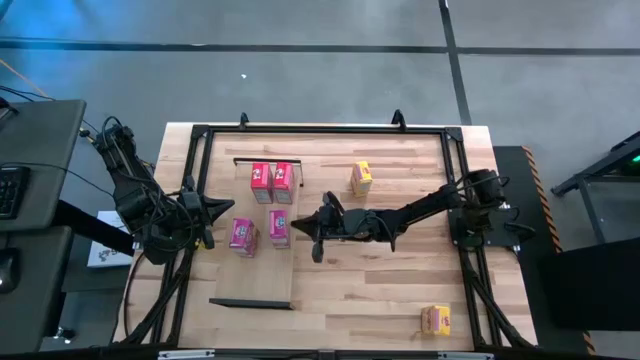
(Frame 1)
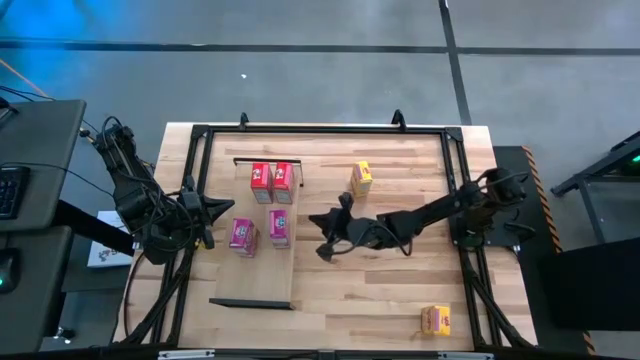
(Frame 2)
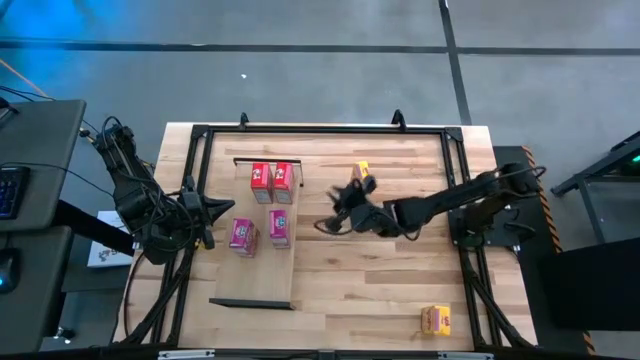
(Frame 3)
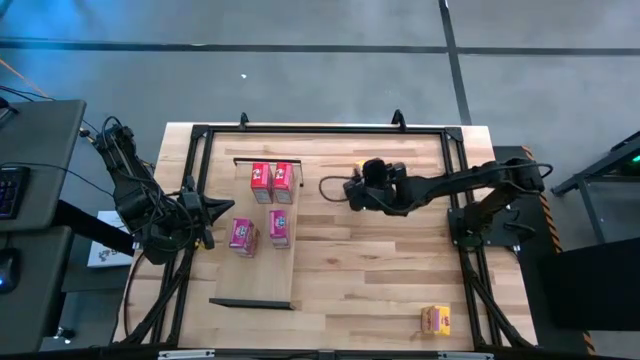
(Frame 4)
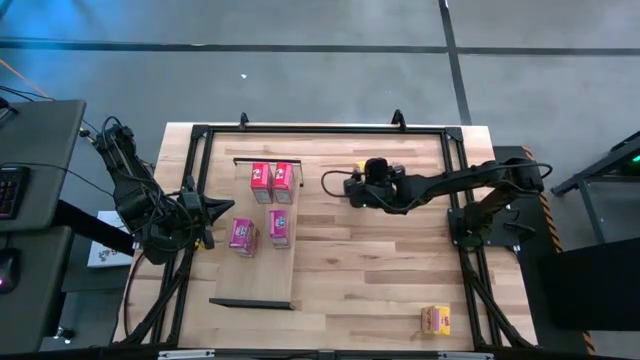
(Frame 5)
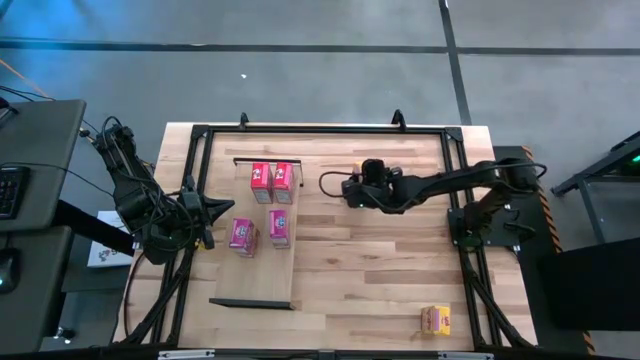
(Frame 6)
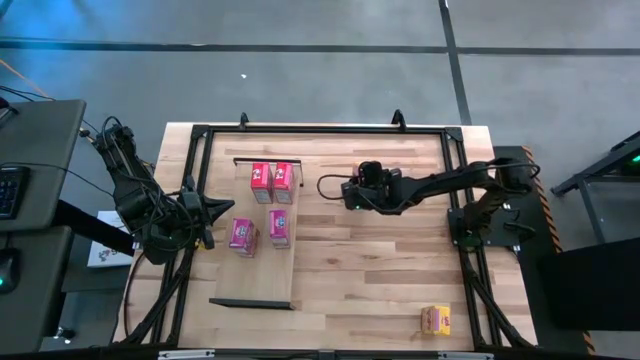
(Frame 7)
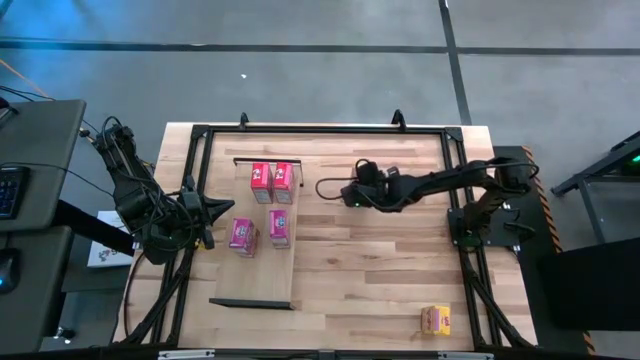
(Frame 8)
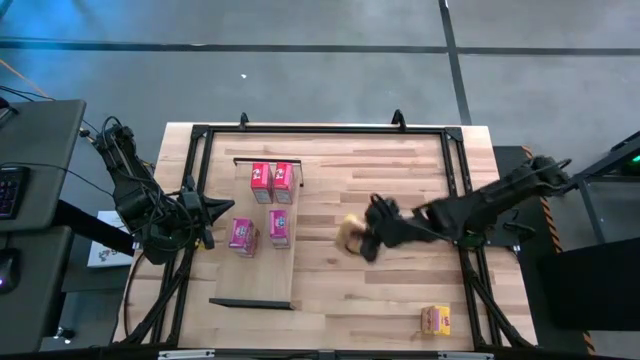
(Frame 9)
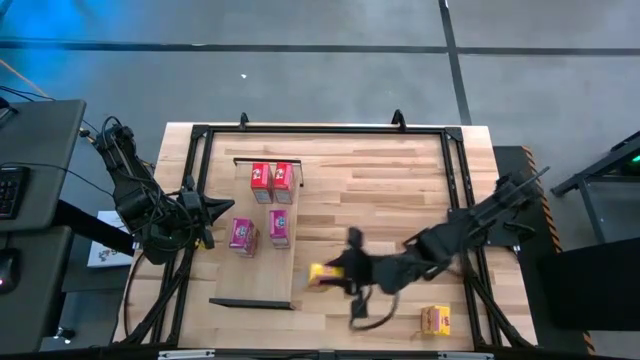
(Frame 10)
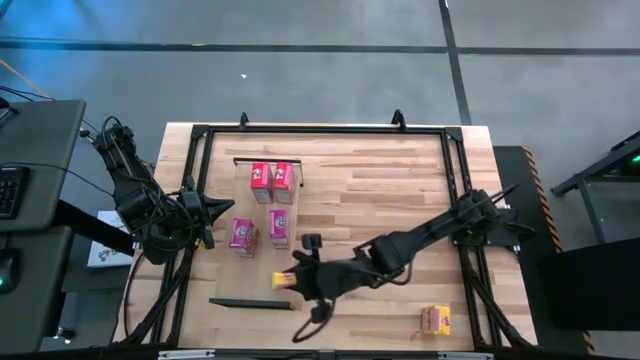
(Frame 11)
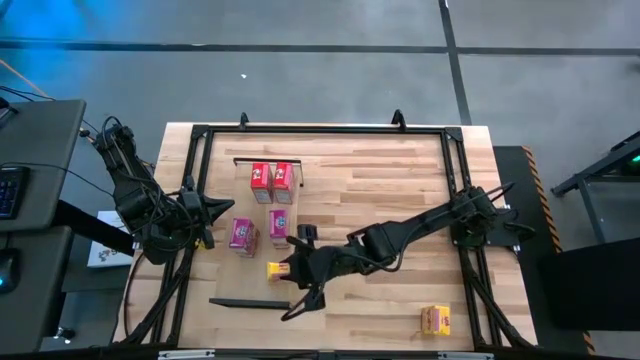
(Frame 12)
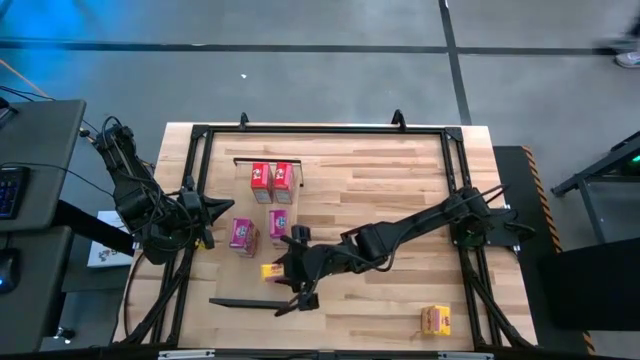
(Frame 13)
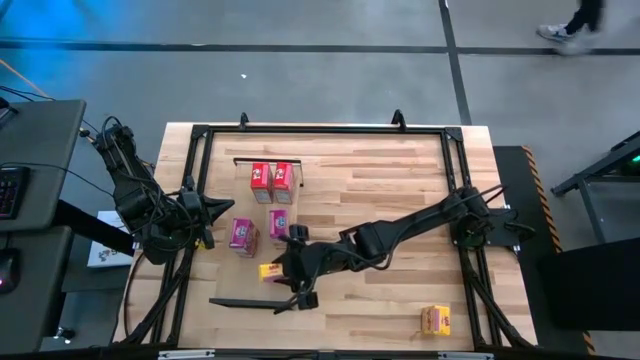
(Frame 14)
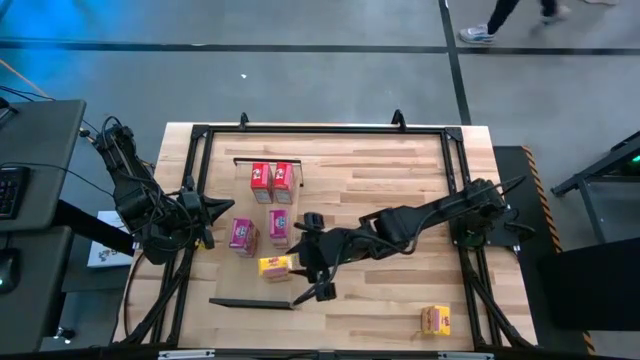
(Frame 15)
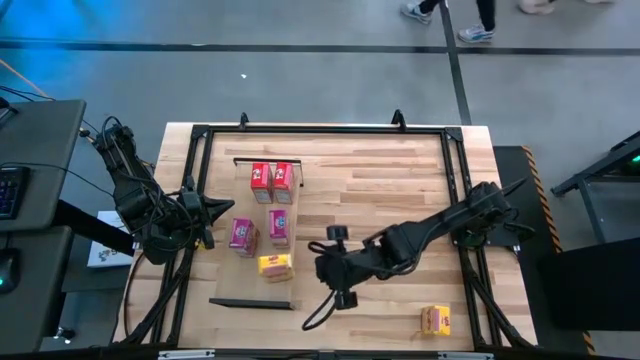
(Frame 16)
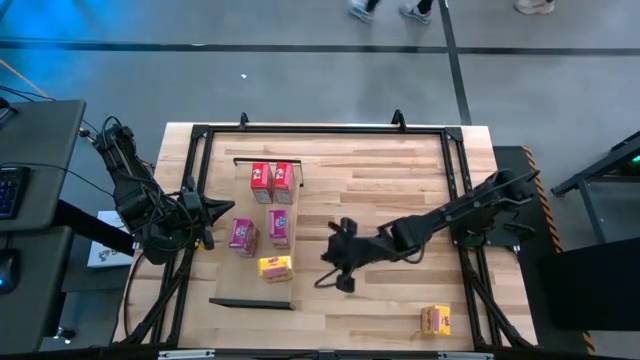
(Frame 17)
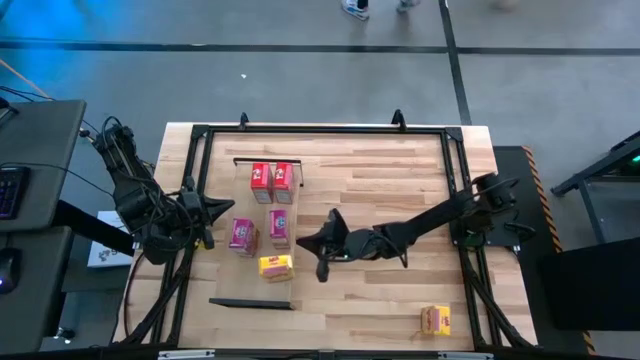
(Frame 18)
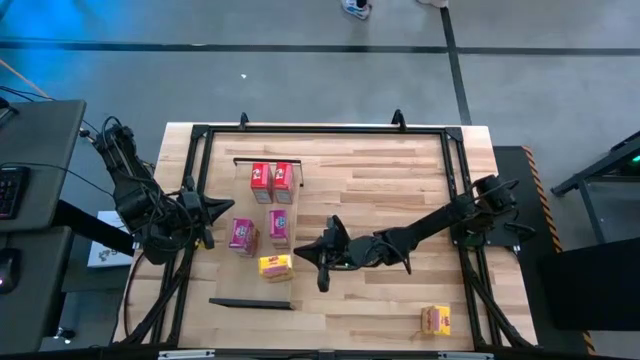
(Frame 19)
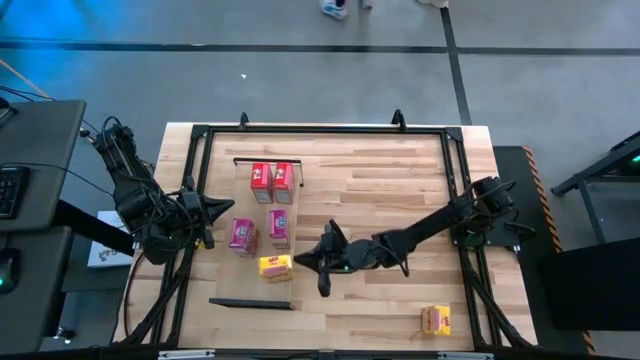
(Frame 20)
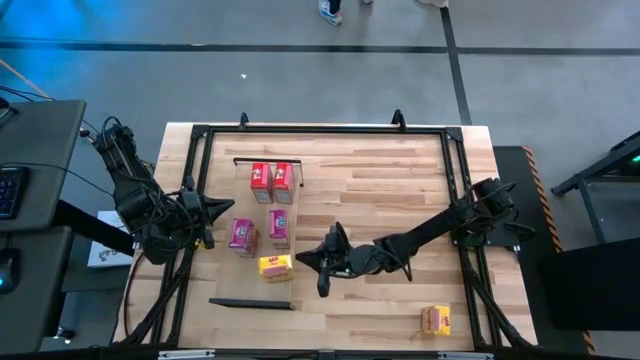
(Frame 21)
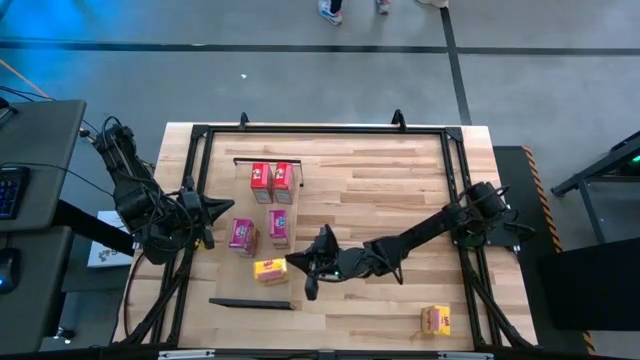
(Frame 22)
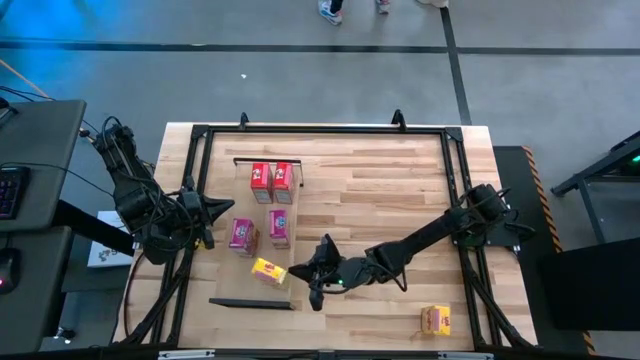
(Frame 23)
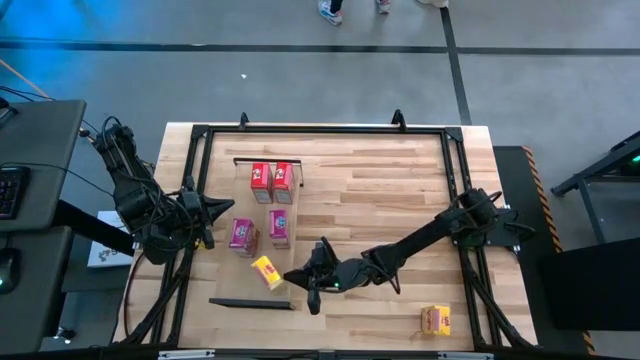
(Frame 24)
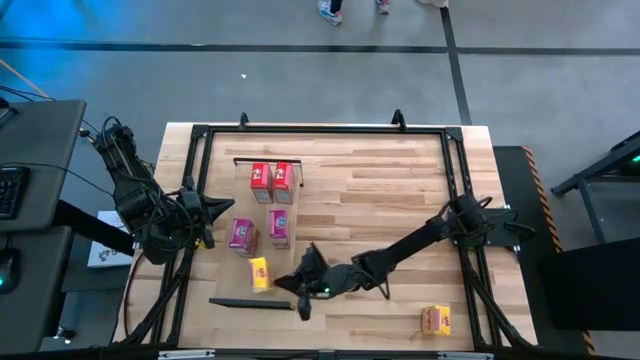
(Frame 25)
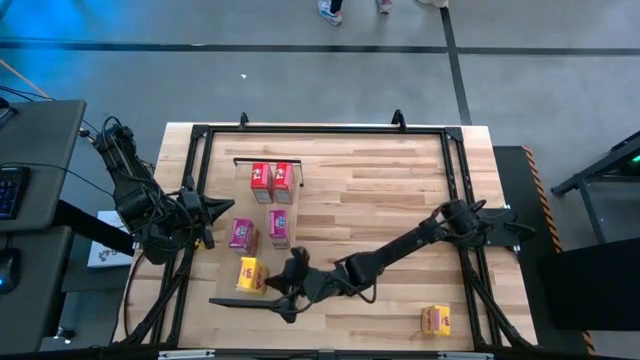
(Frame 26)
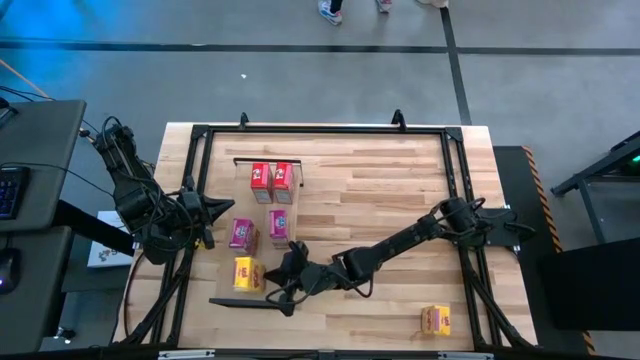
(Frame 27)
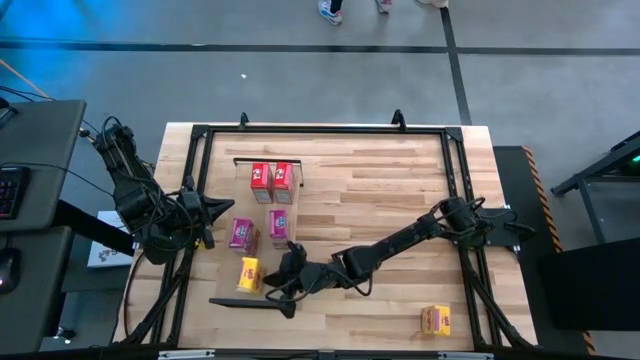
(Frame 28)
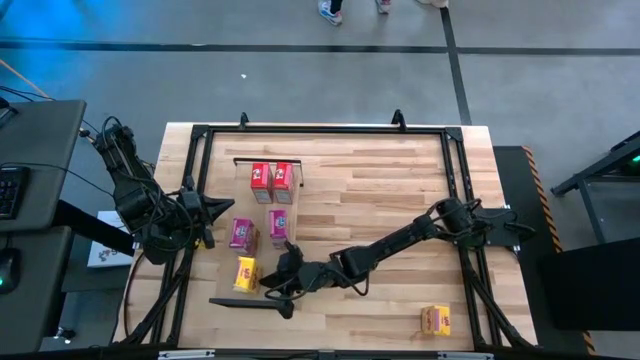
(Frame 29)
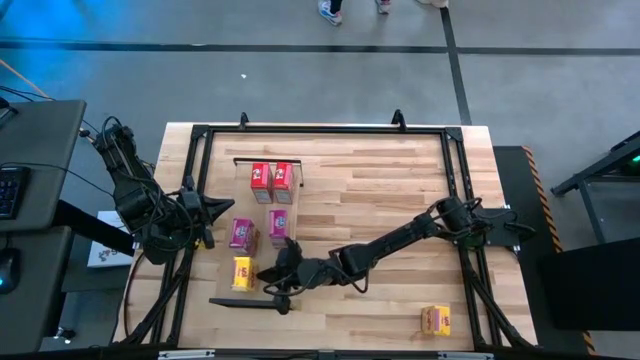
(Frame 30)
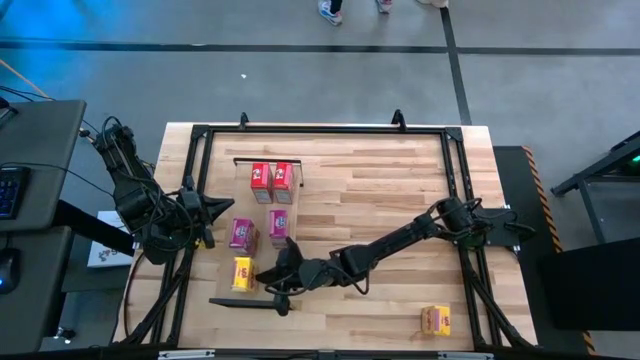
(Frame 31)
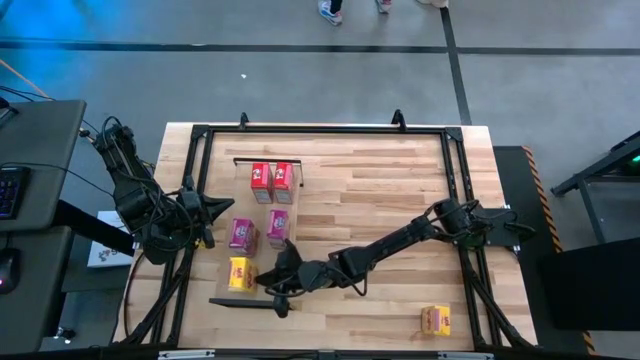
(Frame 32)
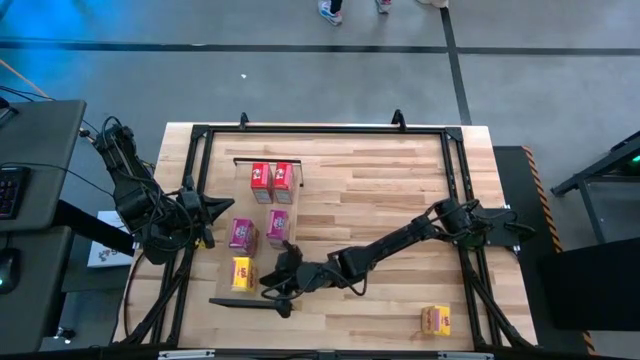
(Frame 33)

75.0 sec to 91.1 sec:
Task: Stack cereal on shelf
Put the top yellow cereal box on the shelf
